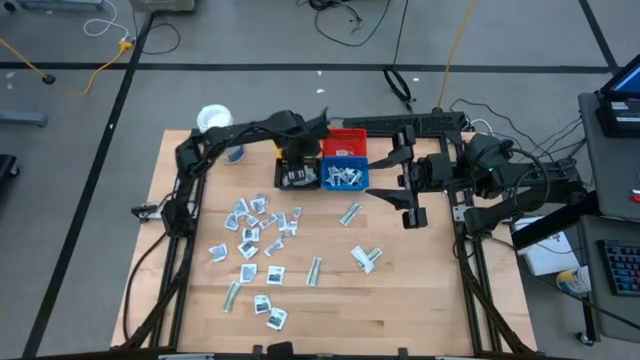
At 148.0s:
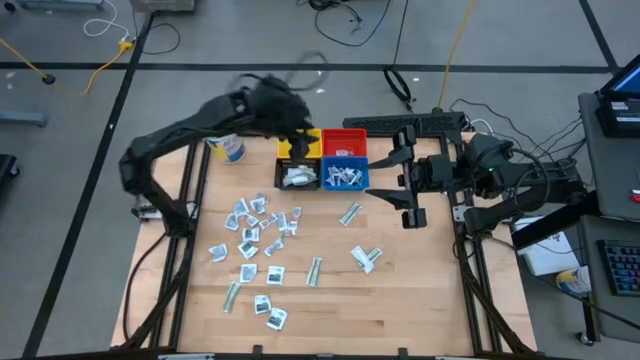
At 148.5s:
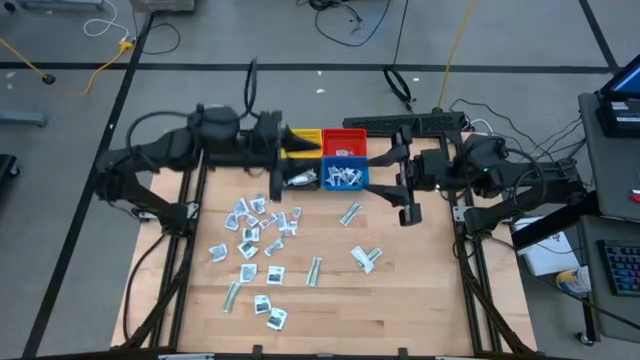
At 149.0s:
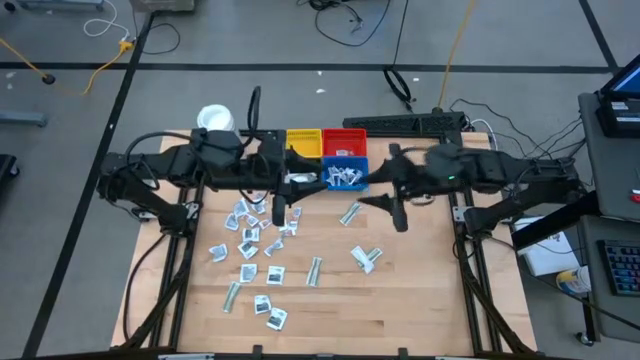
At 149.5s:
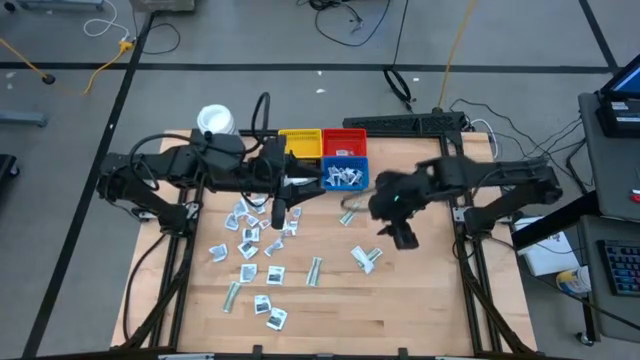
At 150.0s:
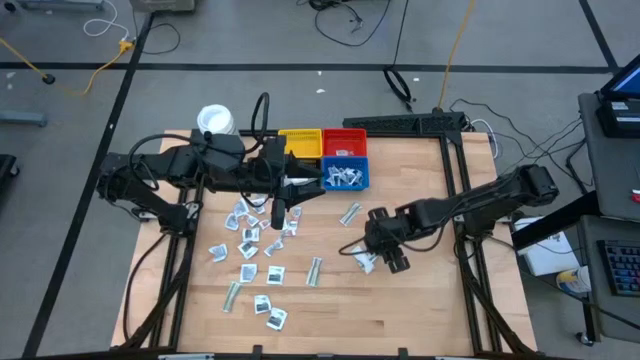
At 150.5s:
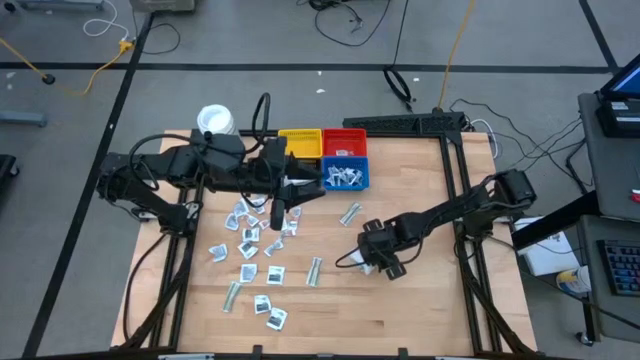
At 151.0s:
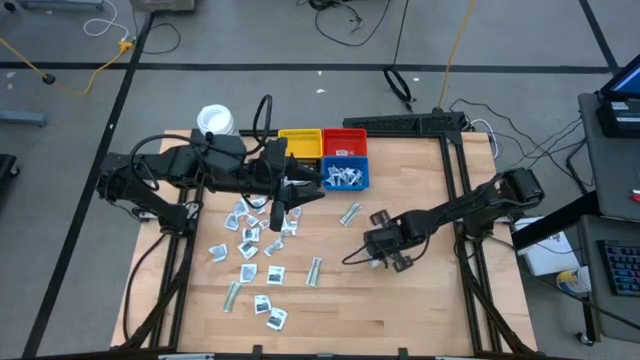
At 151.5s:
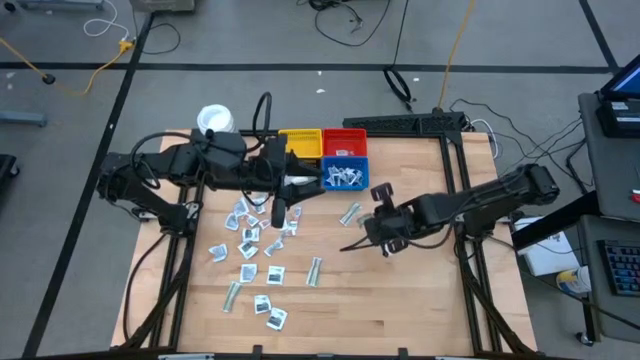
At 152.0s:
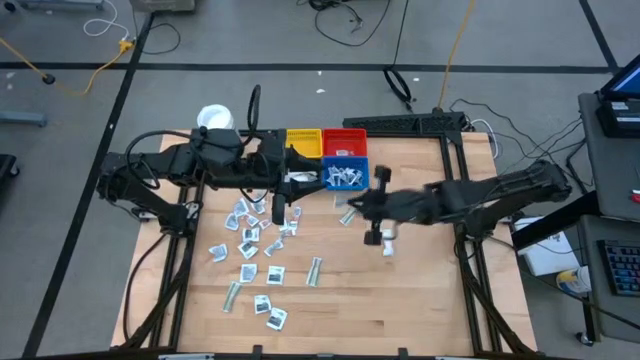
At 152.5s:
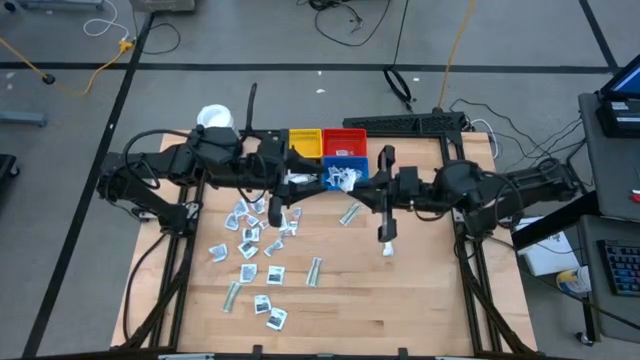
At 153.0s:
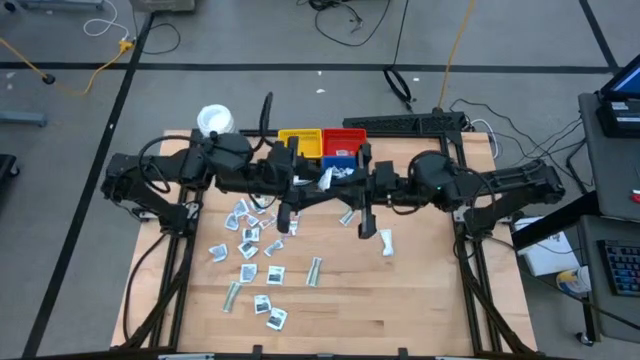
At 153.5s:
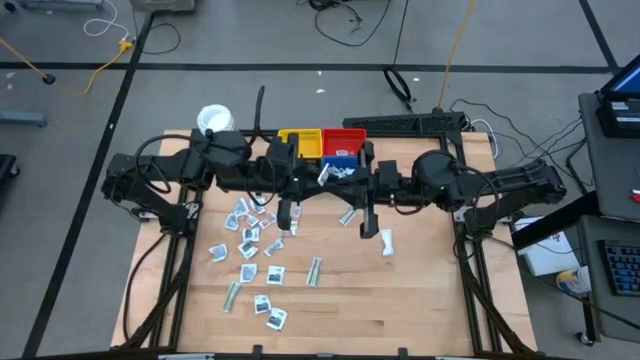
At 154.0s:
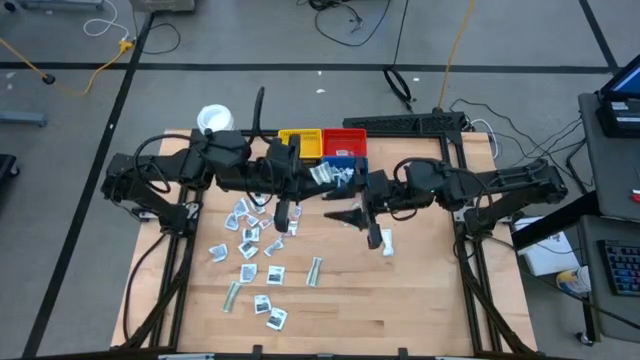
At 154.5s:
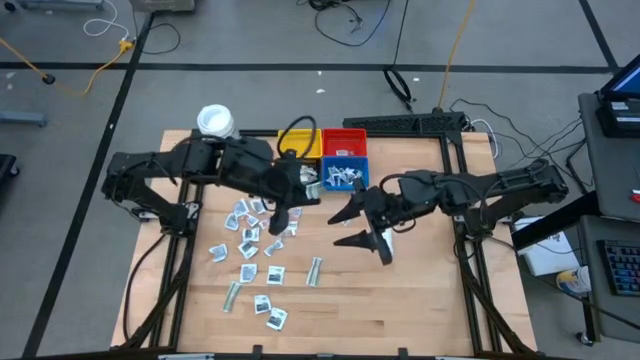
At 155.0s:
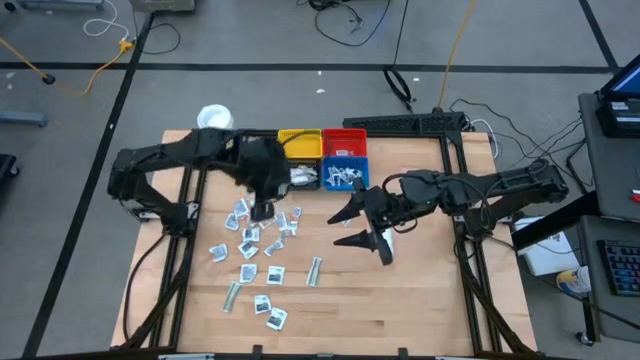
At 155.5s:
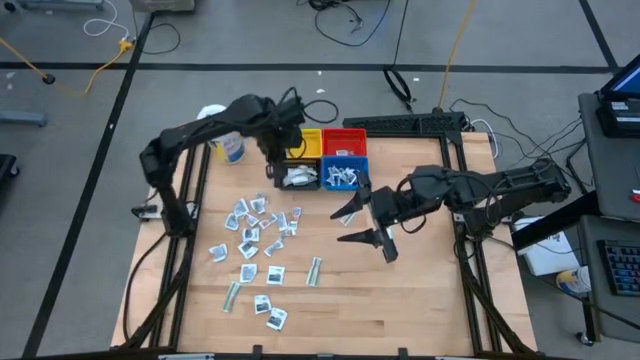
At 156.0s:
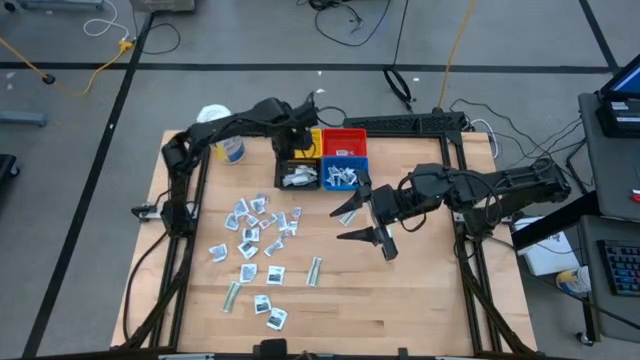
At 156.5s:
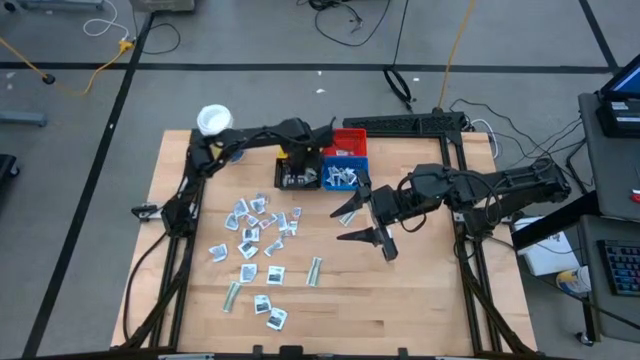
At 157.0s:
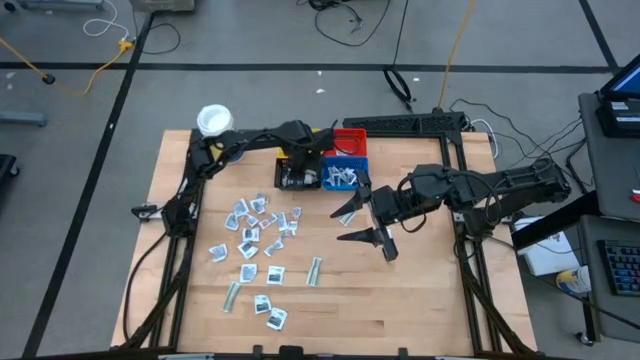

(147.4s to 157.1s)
Task: Pick & Place First Aid Supplies
Put the green bandage pack into the black basket

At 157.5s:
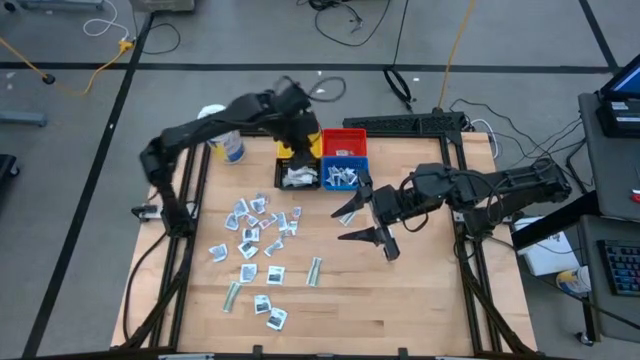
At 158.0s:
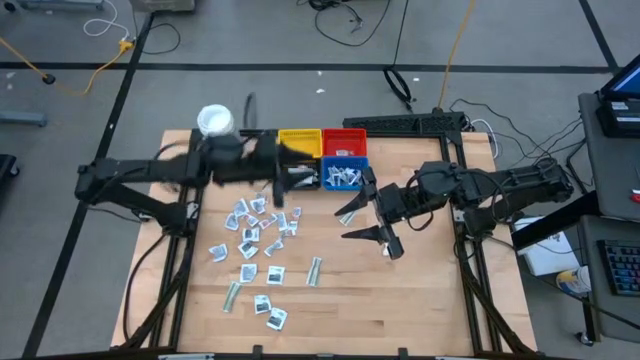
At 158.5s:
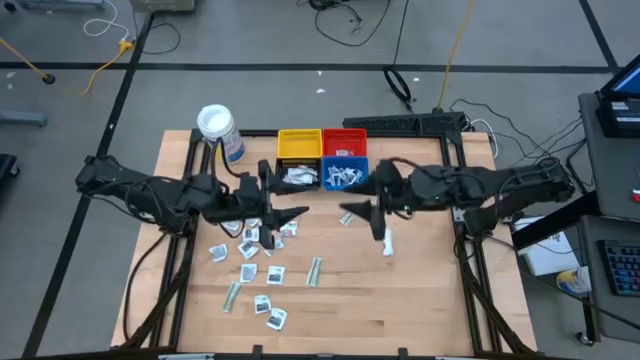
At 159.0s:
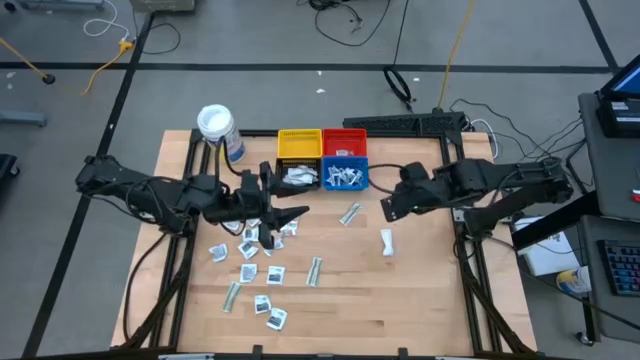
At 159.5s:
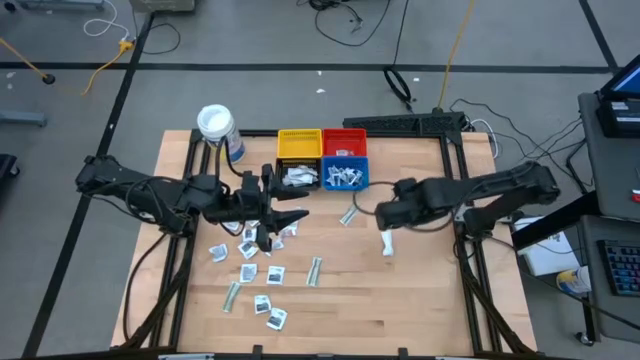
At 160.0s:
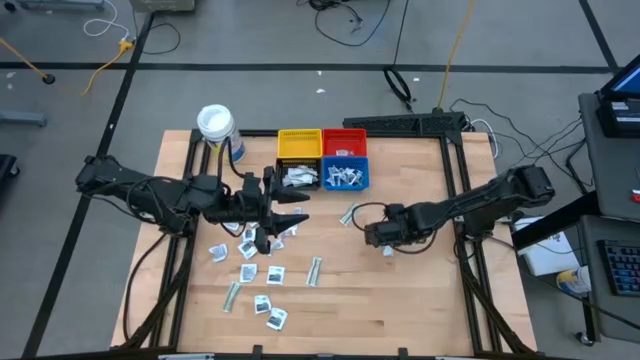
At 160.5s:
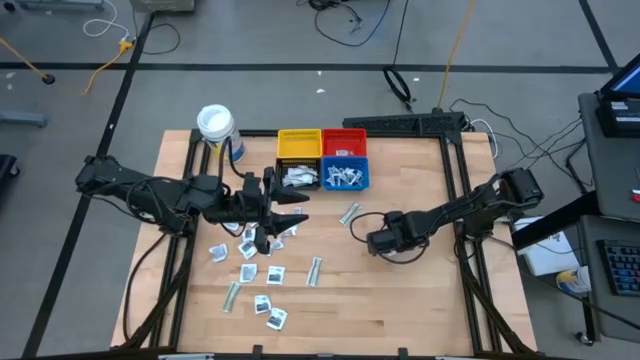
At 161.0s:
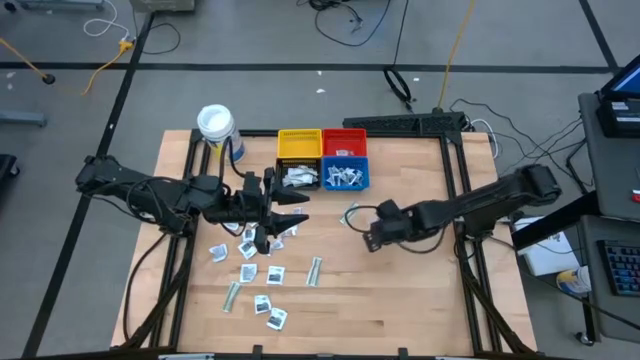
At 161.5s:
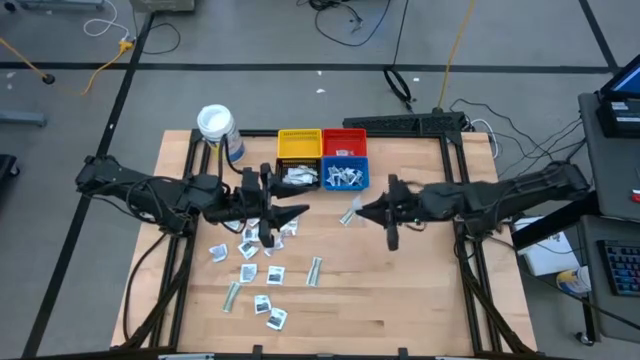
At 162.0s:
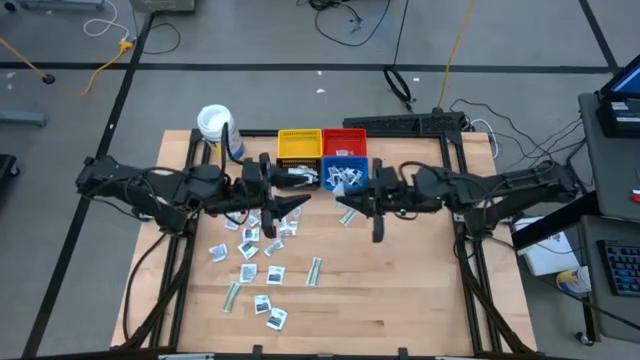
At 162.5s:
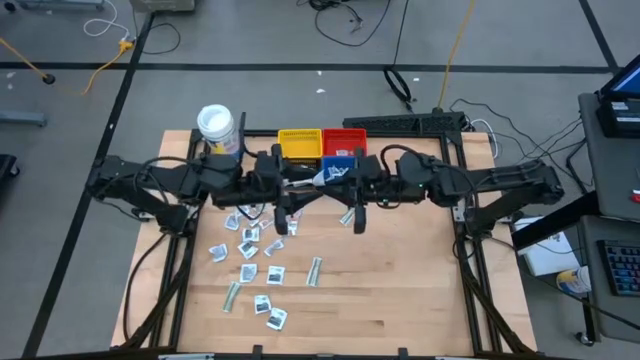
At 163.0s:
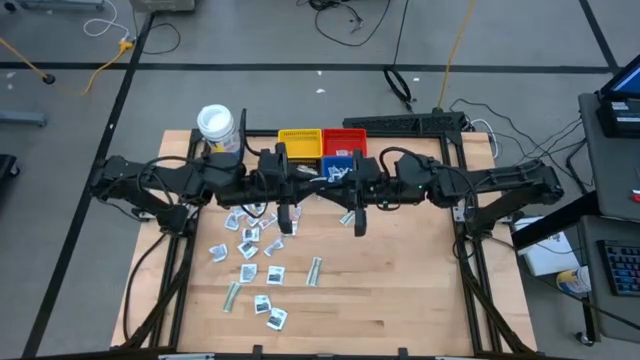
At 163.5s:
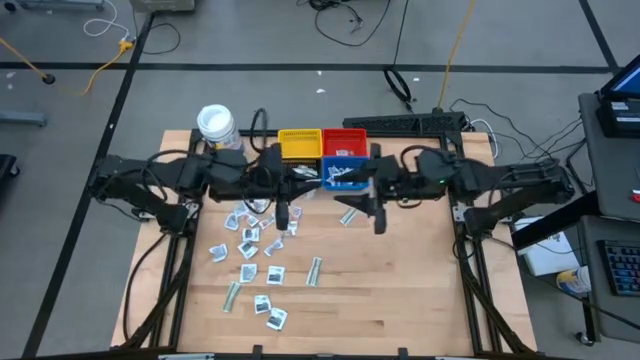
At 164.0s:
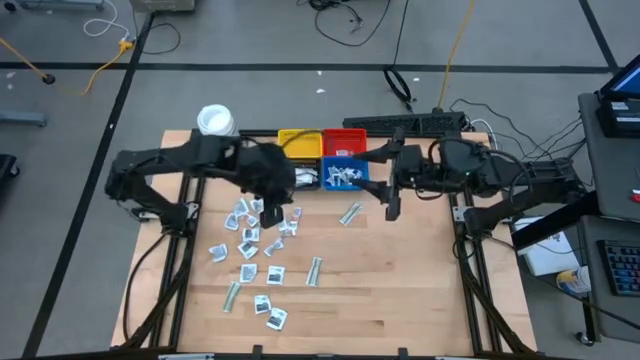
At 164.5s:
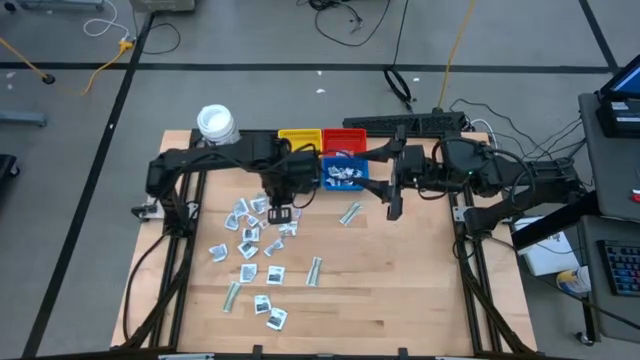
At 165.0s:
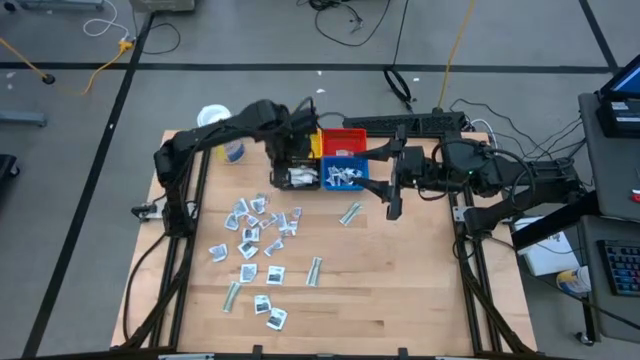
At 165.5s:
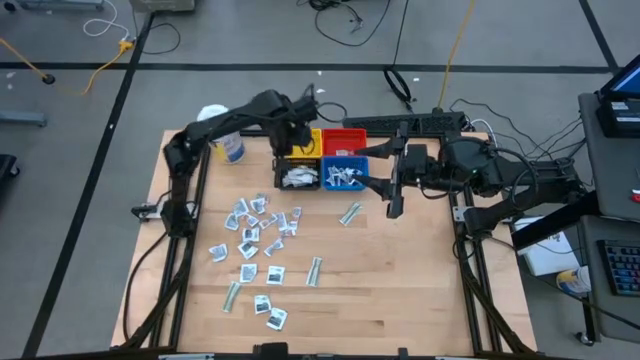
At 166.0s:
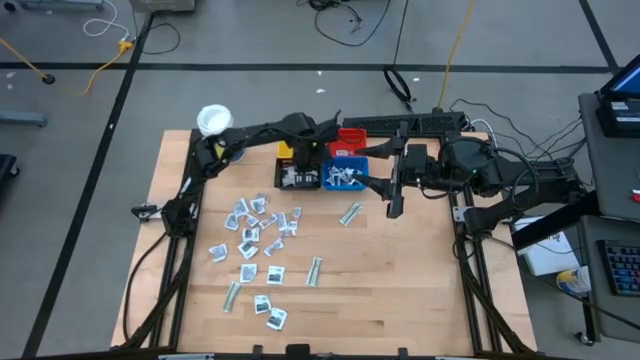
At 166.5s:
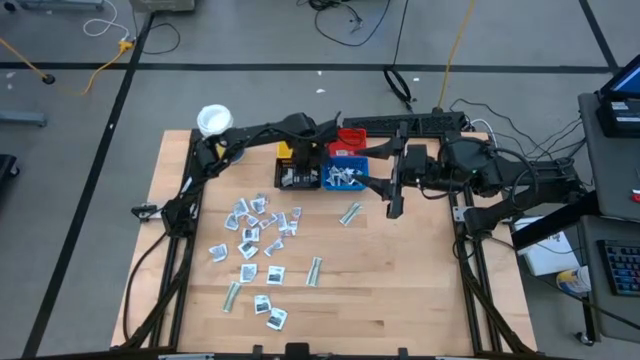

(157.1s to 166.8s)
Put the green bandage pack into the black basket

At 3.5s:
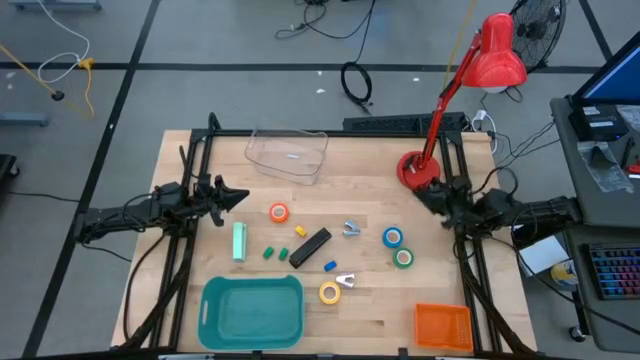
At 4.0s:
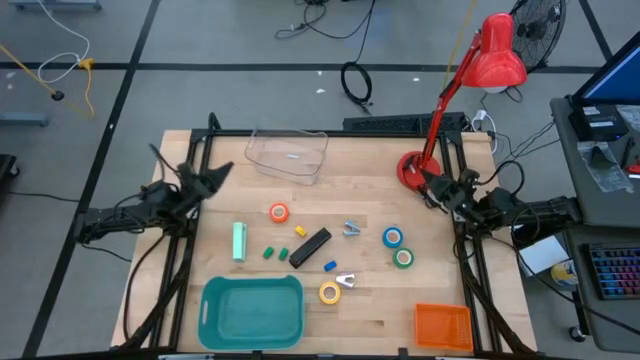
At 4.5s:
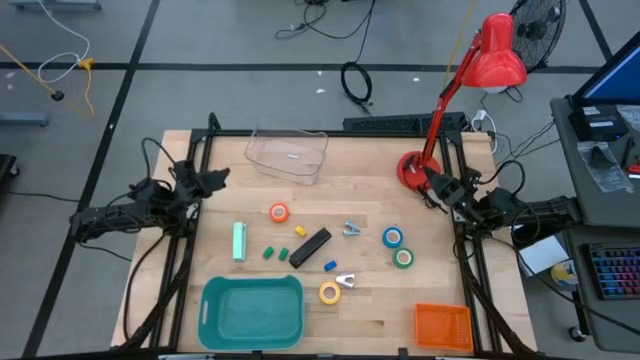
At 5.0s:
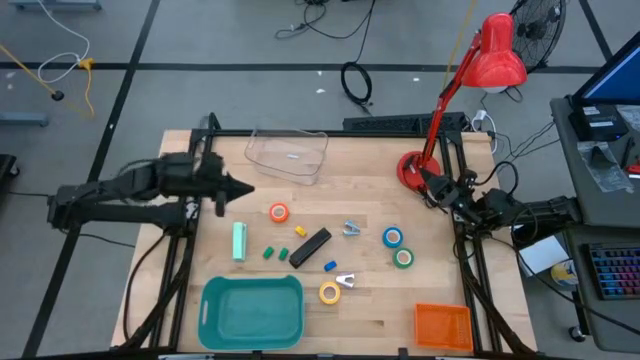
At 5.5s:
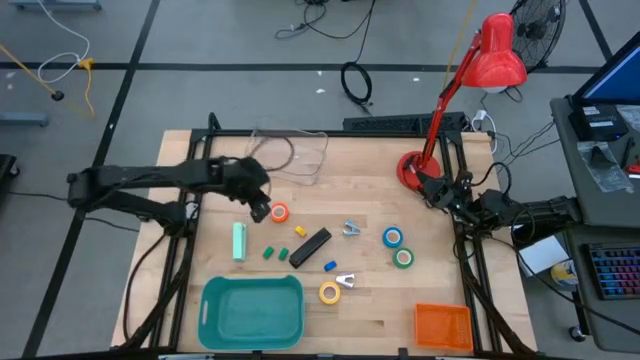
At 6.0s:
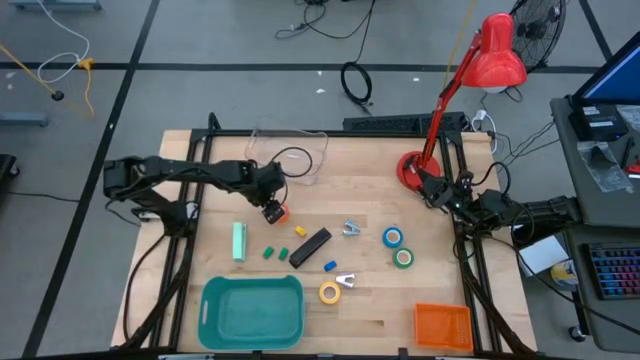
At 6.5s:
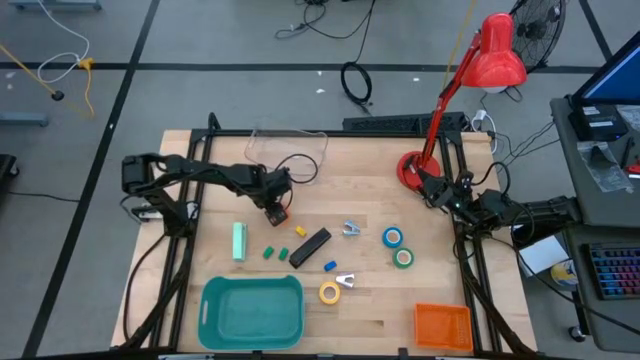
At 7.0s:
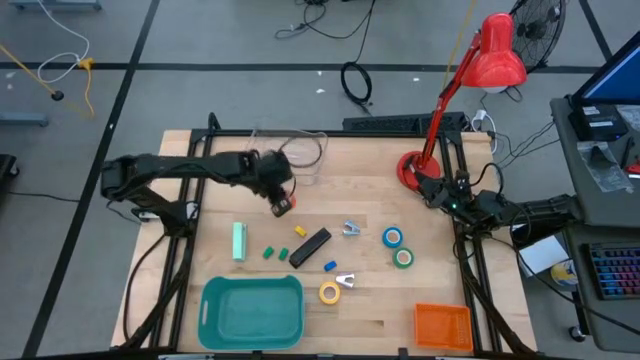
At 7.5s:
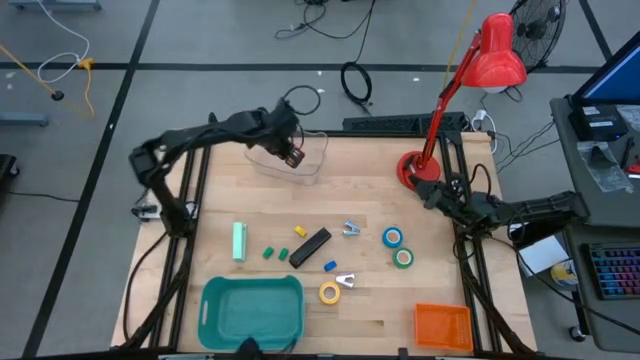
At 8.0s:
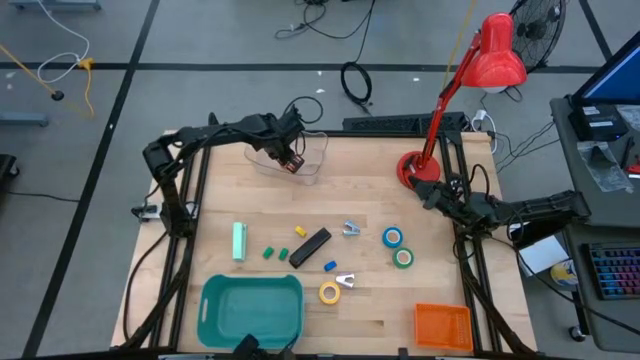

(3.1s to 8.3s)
Task: Pick and place Stapler, Stapler remover, tape
Put the orange tape into the transparent bin
